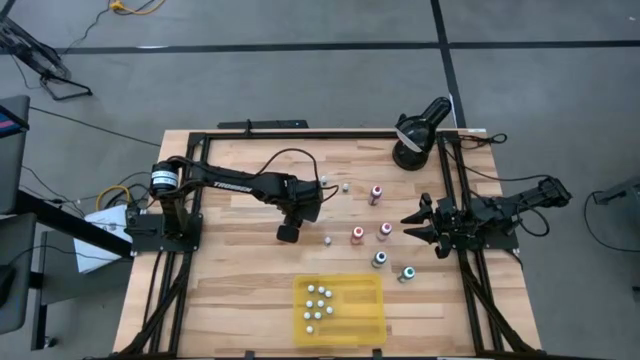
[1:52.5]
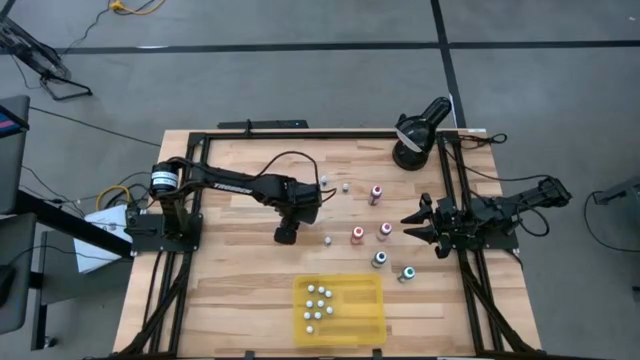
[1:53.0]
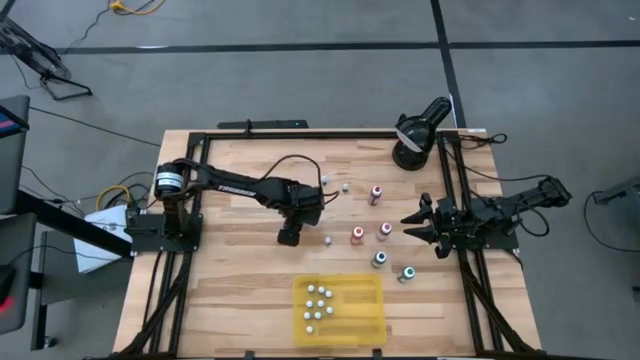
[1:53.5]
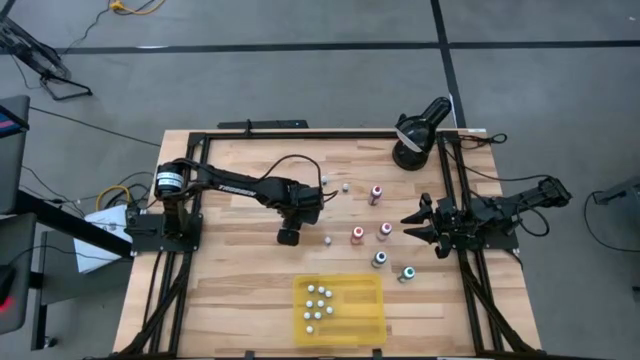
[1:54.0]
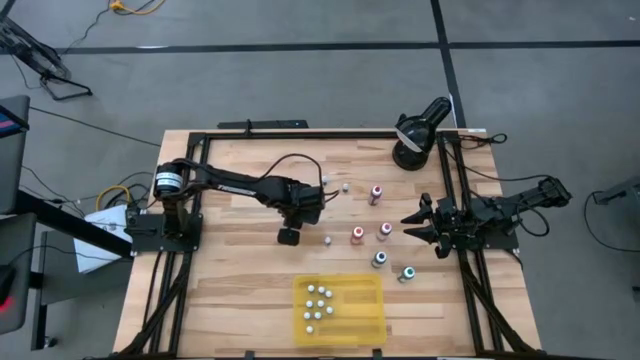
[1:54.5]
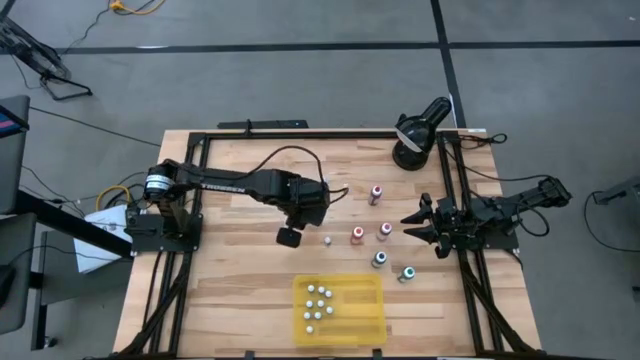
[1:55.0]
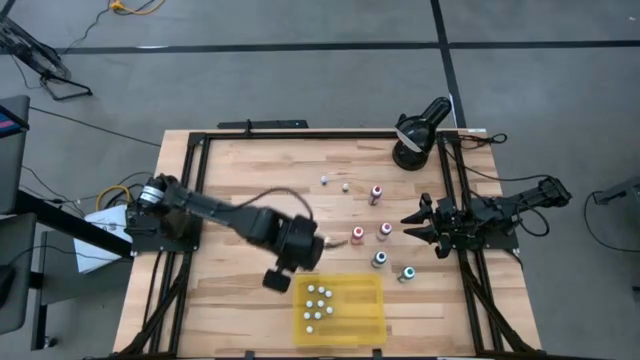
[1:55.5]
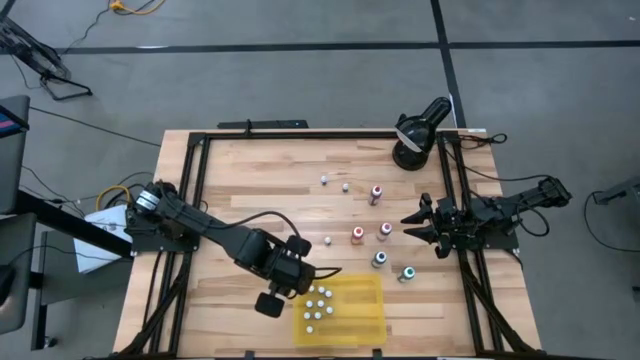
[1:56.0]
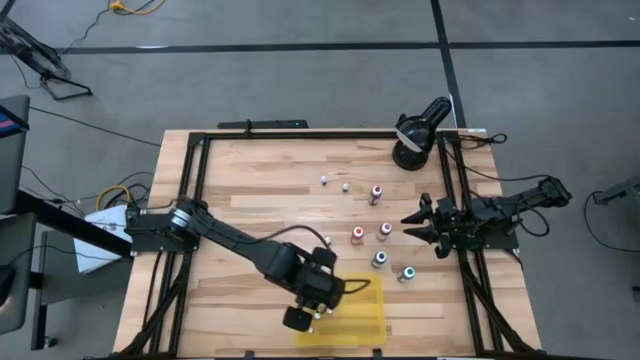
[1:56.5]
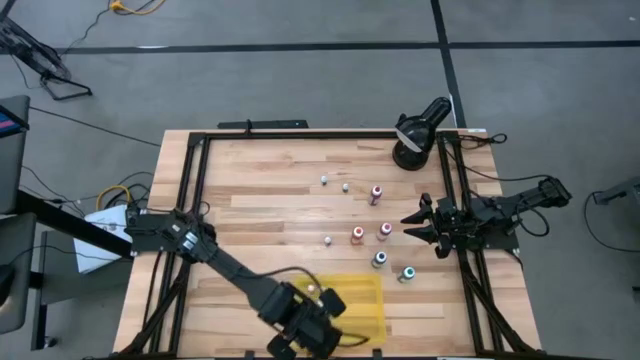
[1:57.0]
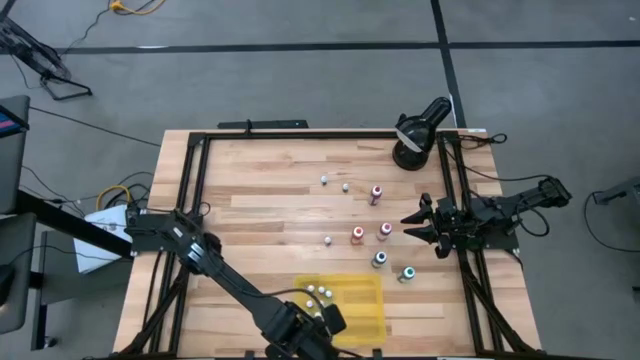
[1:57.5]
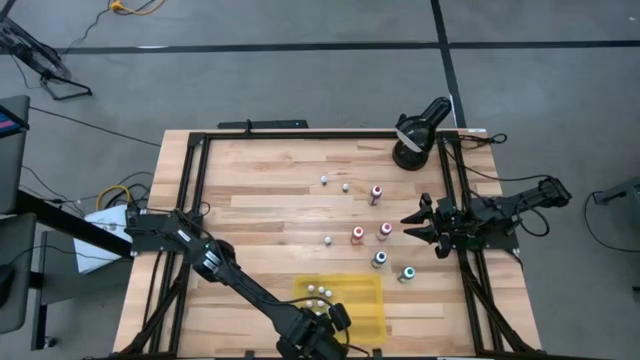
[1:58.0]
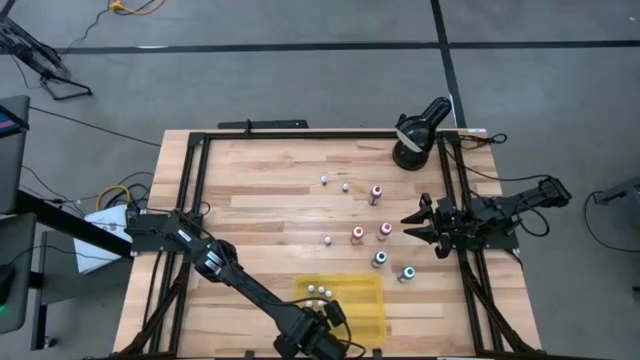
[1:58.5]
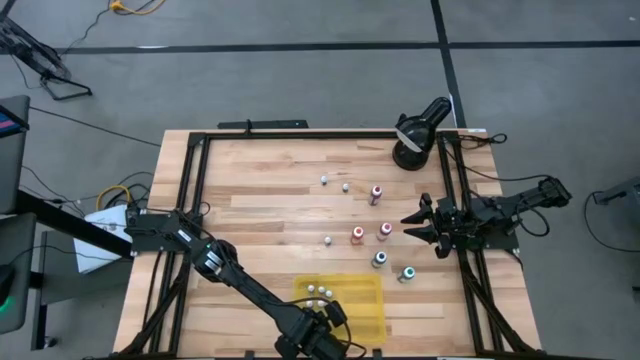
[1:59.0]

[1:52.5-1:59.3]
Task: Pick & Place food coloring
Put the small blue food coloring bottle in the yellow bin

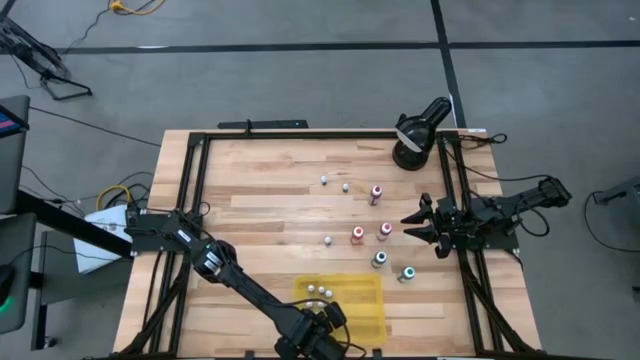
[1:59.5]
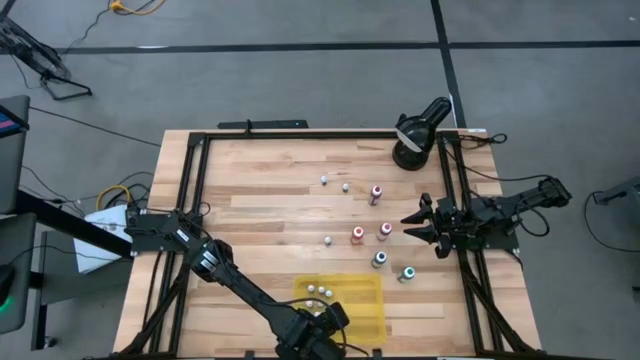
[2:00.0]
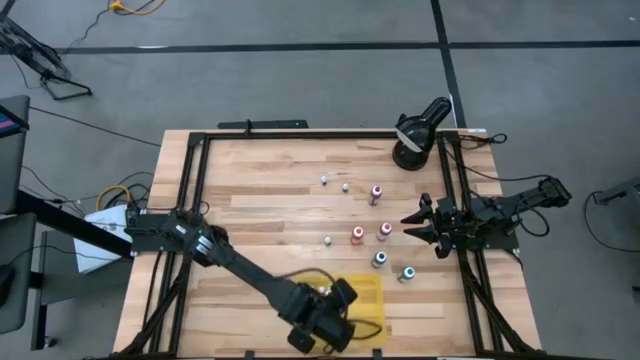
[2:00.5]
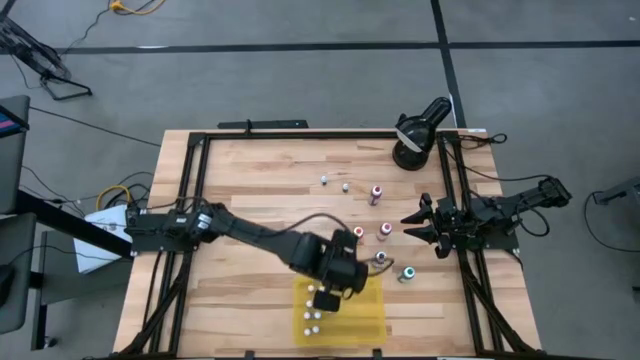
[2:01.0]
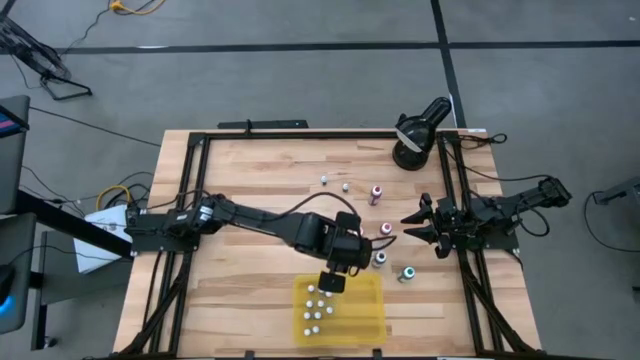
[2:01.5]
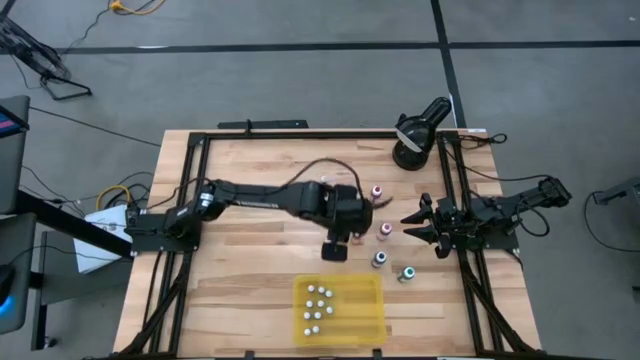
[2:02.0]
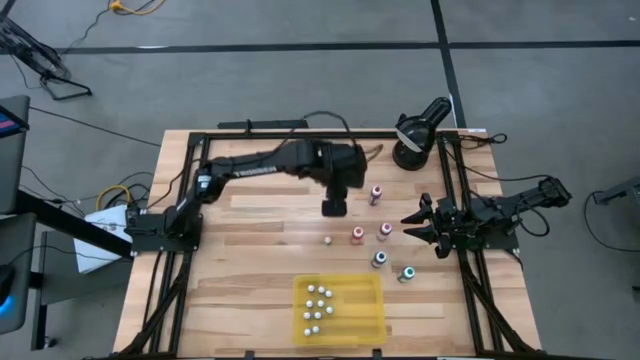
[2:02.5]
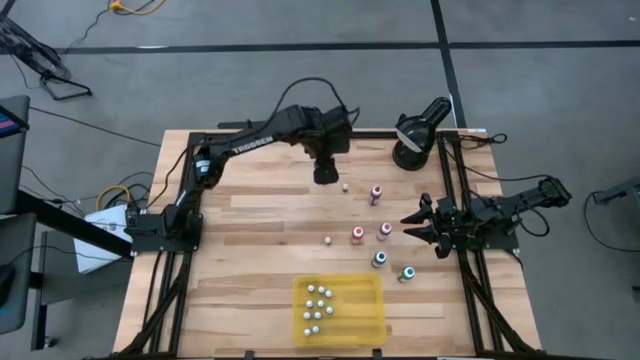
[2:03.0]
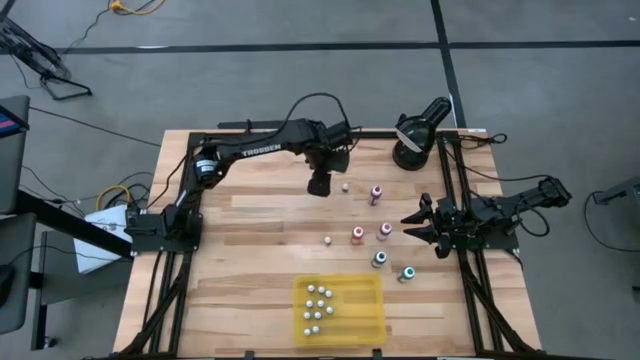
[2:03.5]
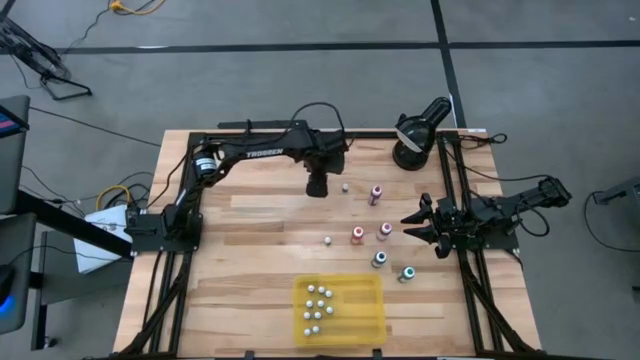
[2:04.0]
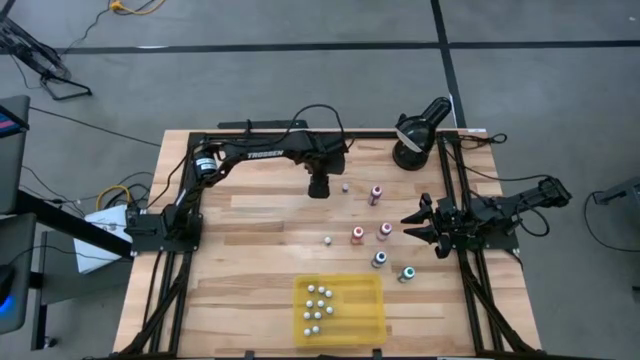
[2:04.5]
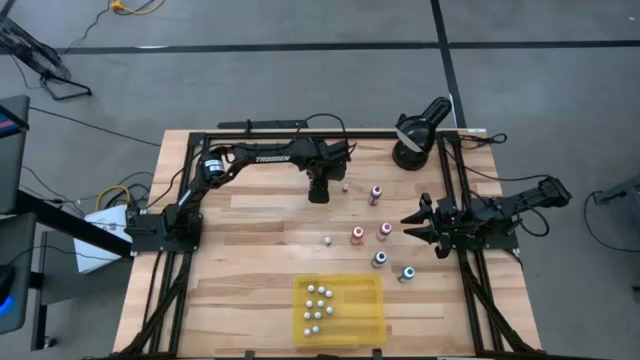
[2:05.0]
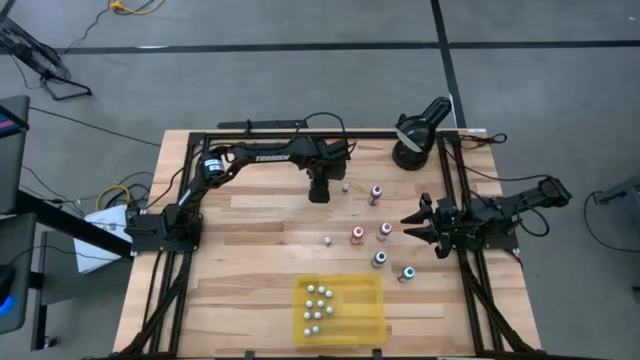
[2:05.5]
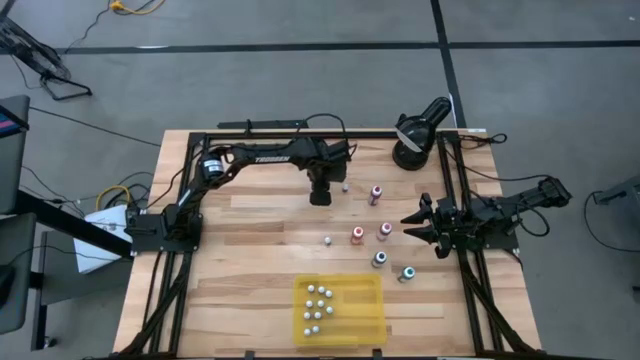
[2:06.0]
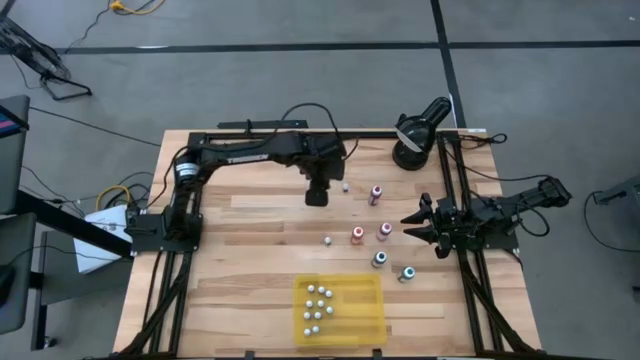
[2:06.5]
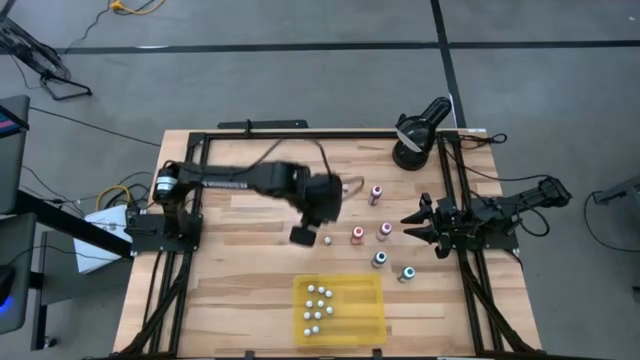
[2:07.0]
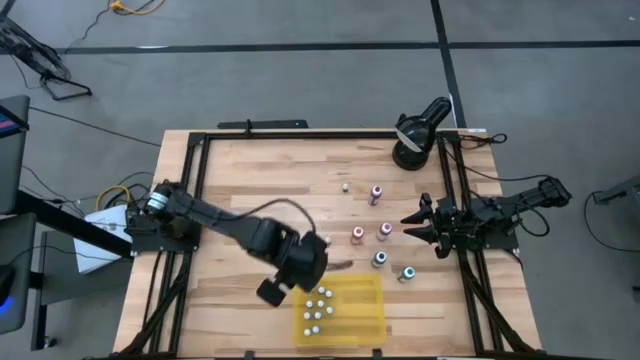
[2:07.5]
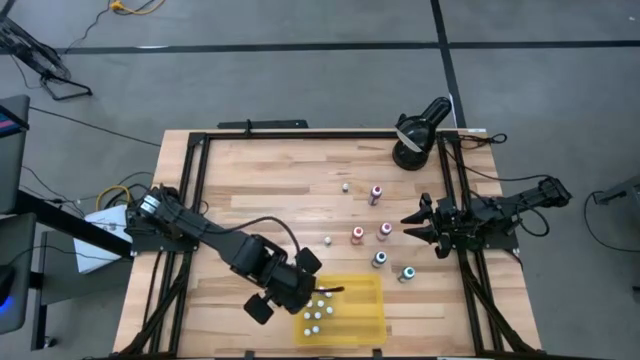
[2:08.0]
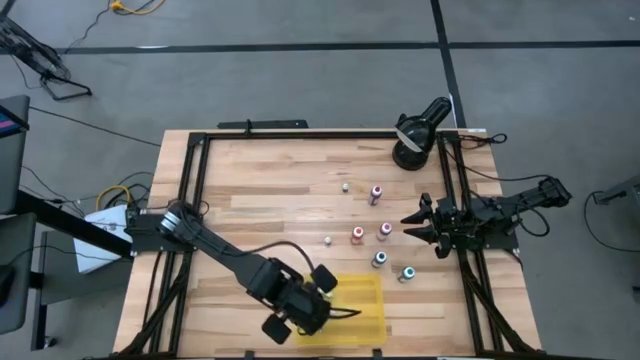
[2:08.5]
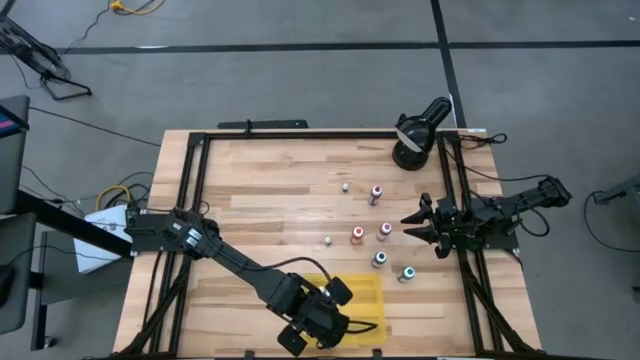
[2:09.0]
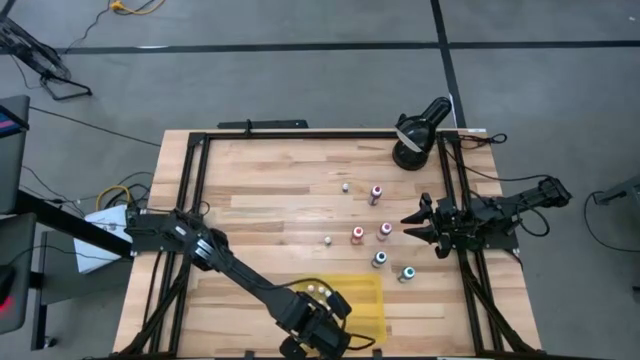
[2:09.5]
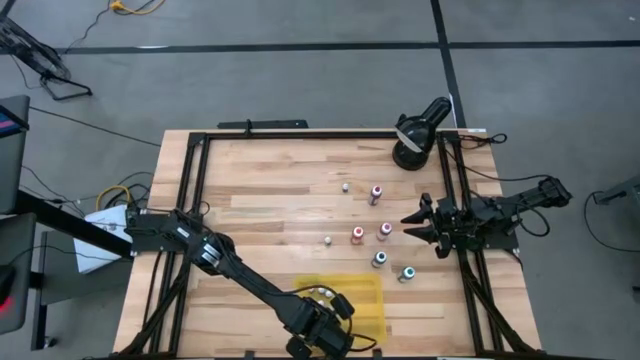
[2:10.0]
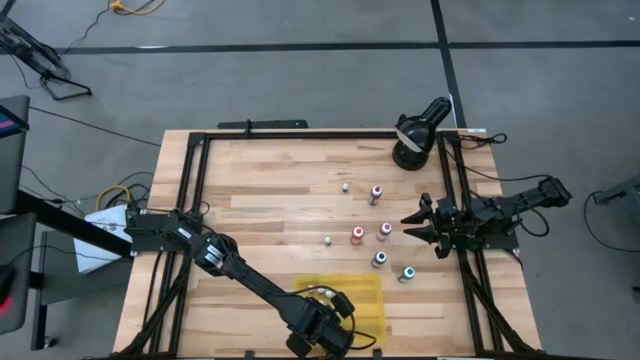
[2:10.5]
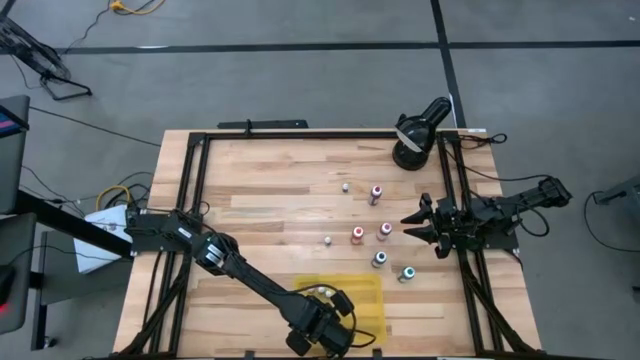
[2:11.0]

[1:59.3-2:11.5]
Put the small red food coloring bottle in the yellow bin

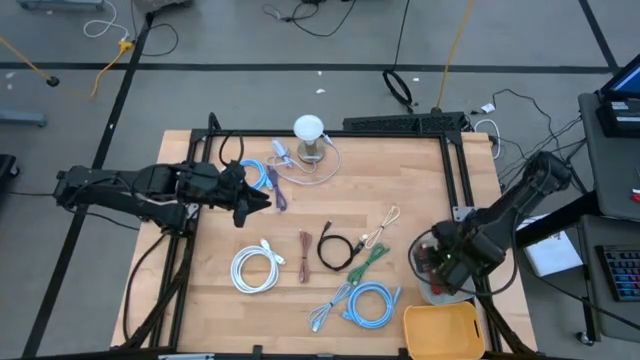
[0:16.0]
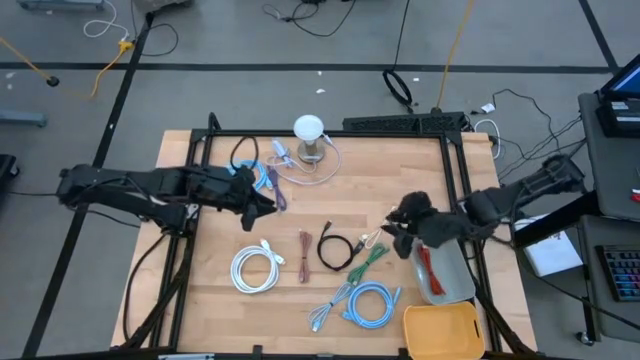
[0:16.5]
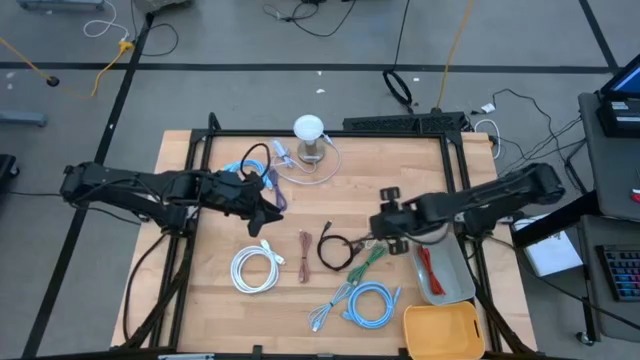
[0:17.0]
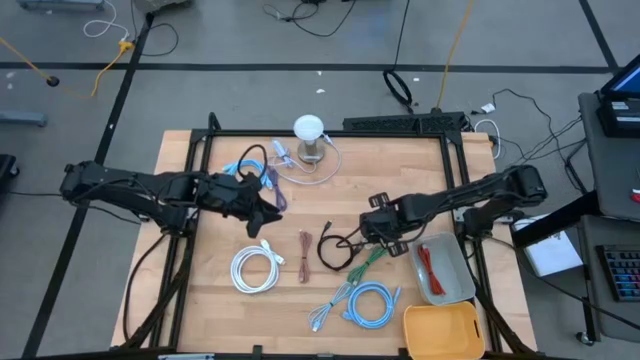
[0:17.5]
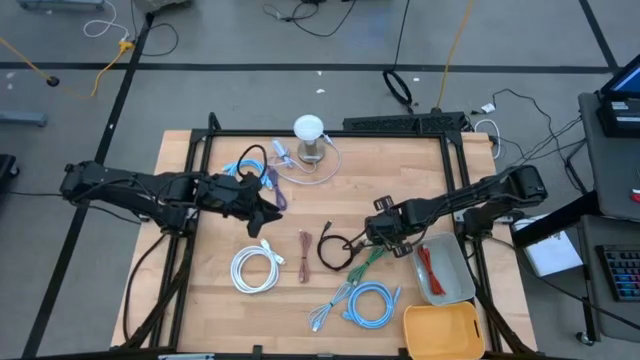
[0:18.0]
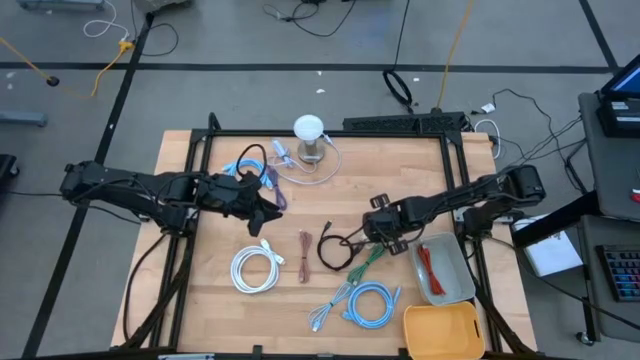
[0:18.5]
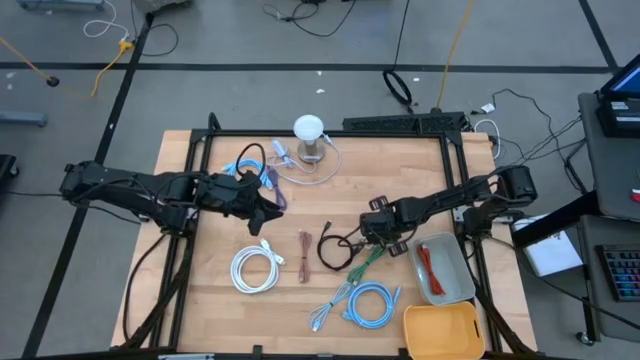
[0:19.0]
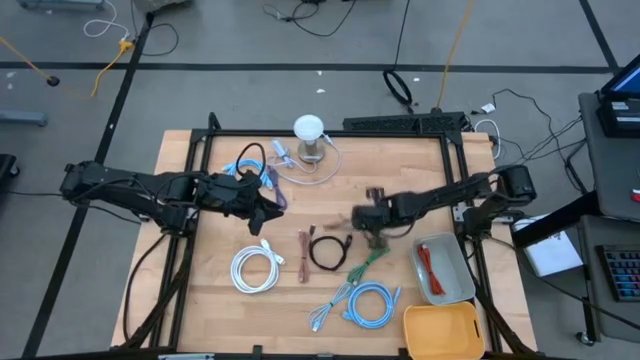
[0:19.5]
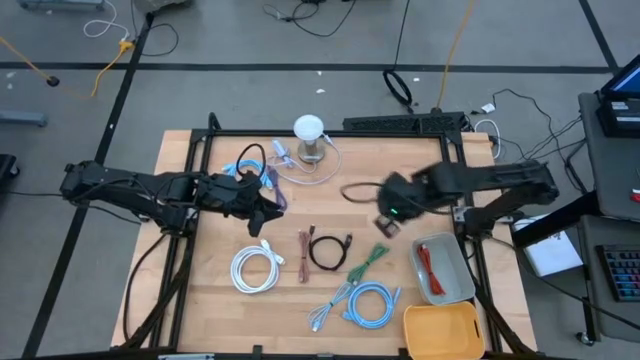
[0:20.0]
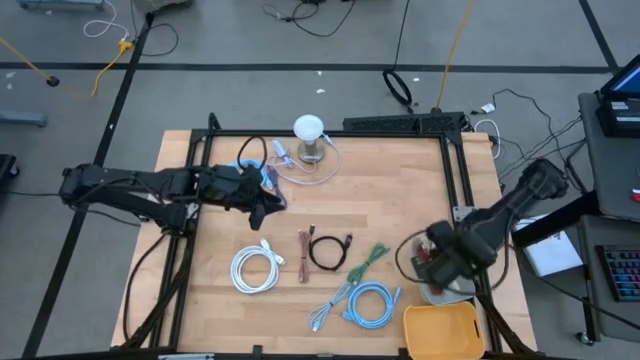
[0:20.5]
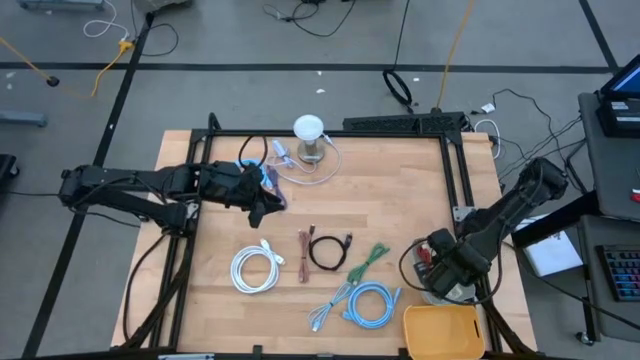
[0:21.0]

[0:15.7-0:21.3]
Task: Pick & Place USB Port
Put the white USB cable into the gray bin
